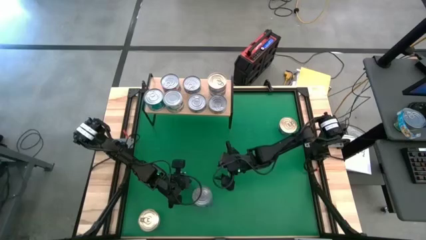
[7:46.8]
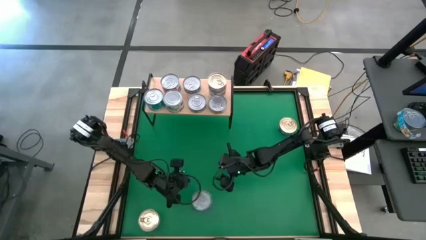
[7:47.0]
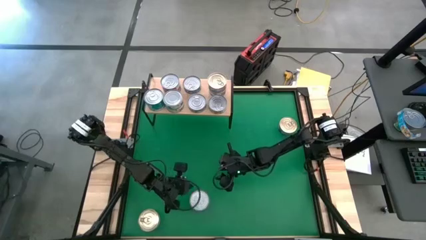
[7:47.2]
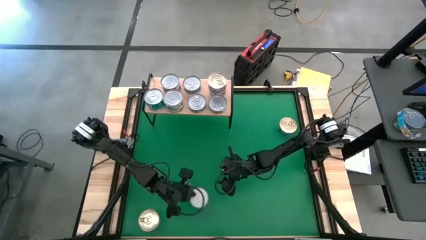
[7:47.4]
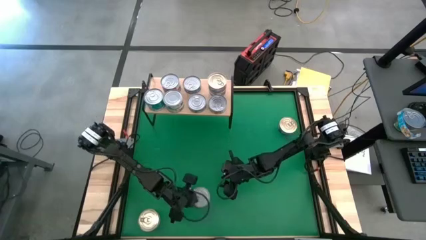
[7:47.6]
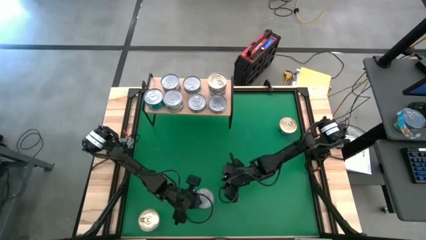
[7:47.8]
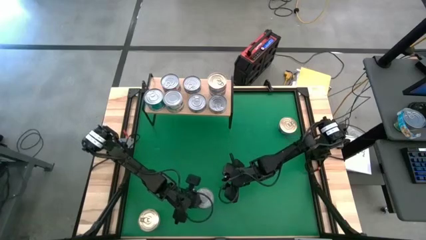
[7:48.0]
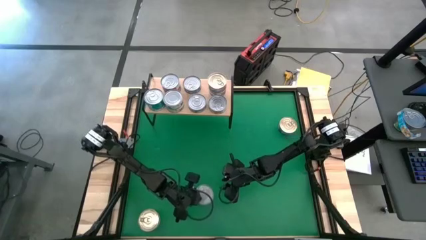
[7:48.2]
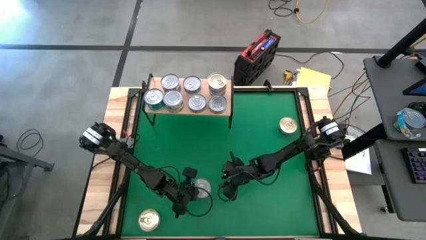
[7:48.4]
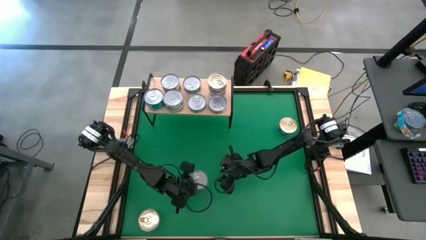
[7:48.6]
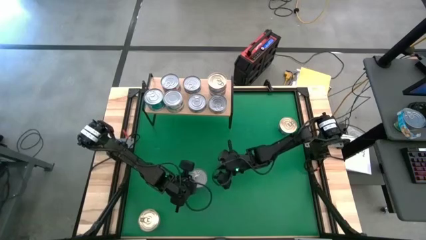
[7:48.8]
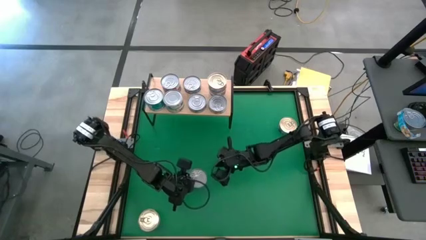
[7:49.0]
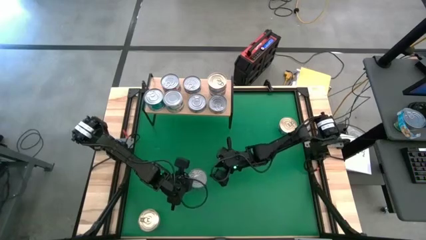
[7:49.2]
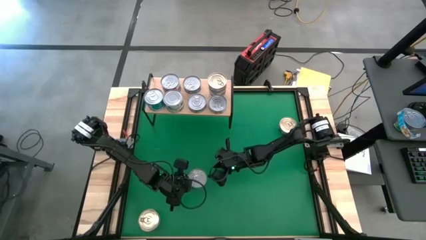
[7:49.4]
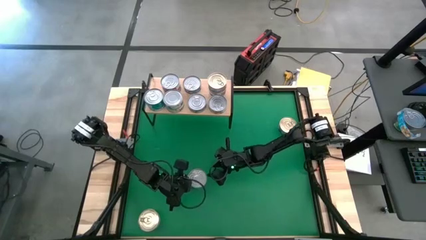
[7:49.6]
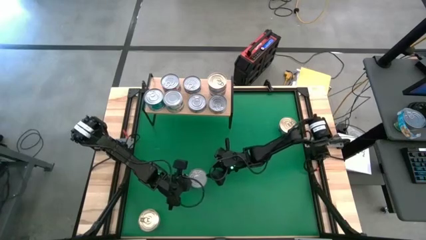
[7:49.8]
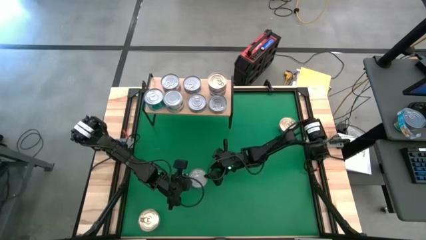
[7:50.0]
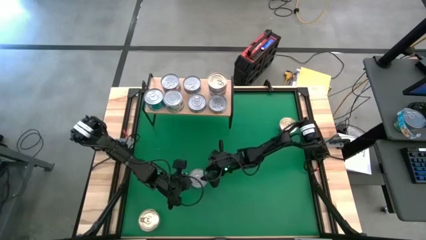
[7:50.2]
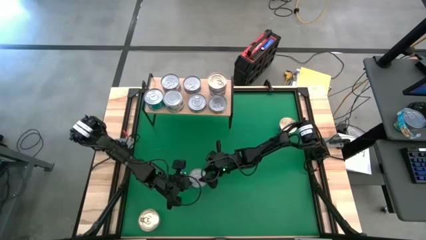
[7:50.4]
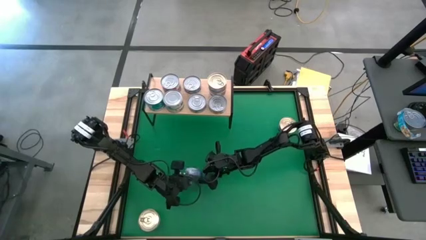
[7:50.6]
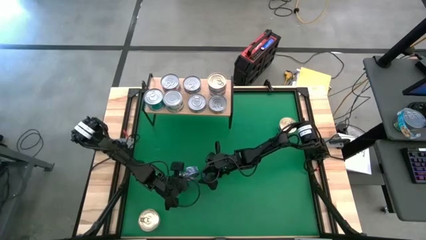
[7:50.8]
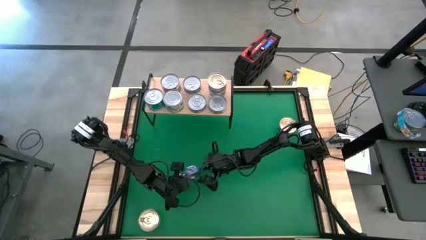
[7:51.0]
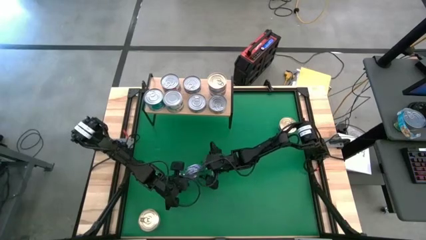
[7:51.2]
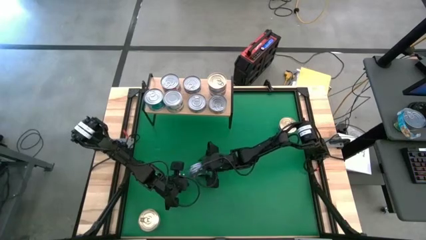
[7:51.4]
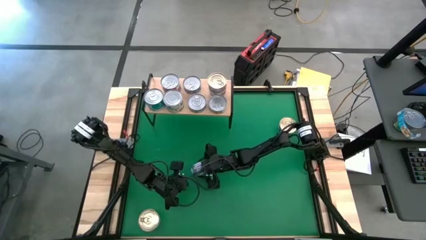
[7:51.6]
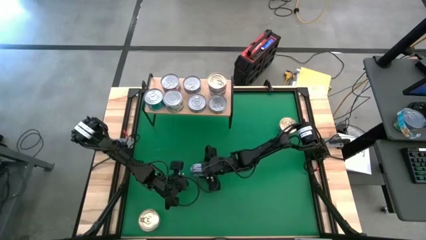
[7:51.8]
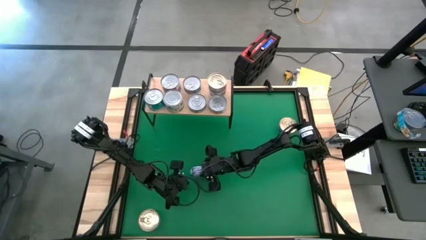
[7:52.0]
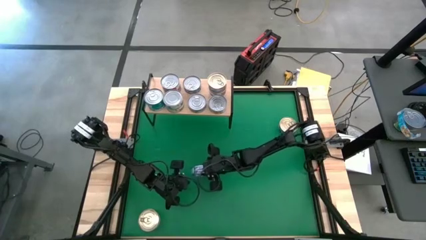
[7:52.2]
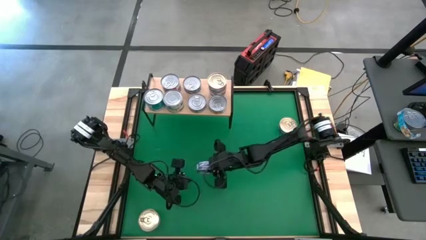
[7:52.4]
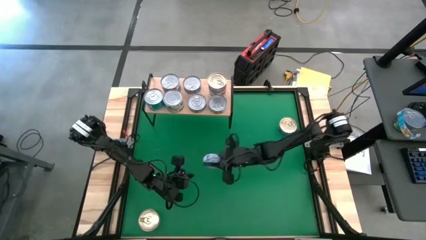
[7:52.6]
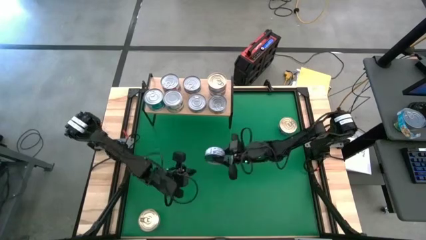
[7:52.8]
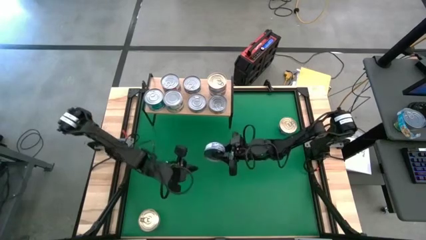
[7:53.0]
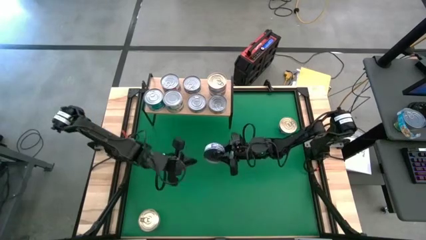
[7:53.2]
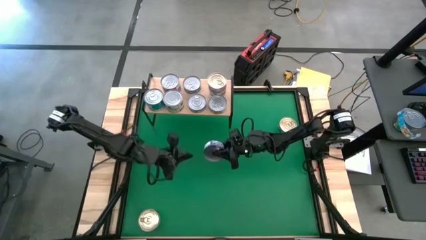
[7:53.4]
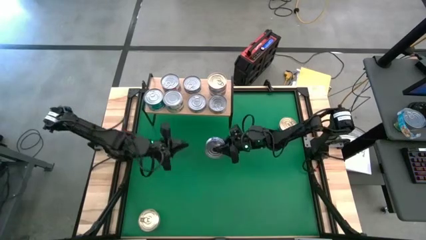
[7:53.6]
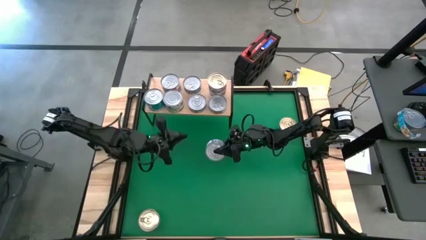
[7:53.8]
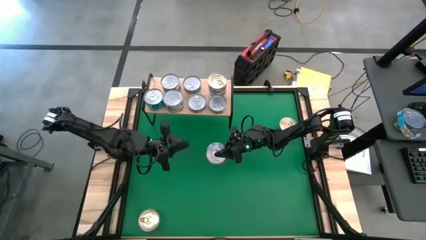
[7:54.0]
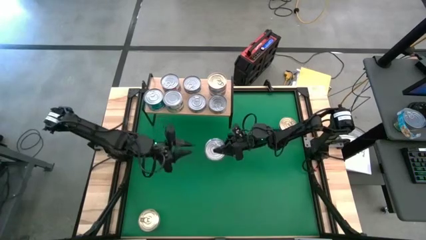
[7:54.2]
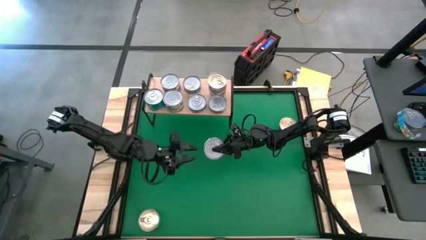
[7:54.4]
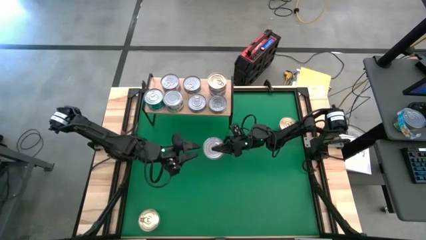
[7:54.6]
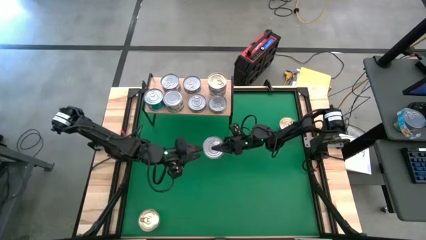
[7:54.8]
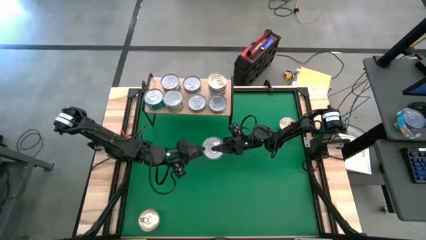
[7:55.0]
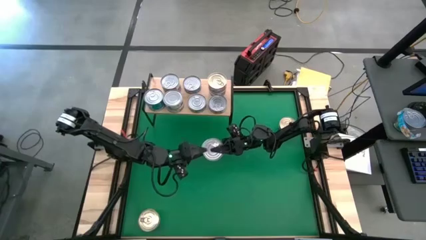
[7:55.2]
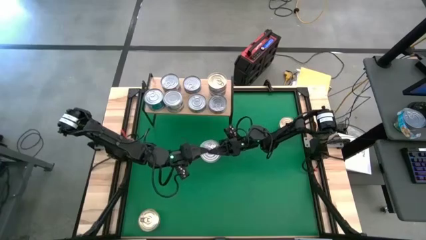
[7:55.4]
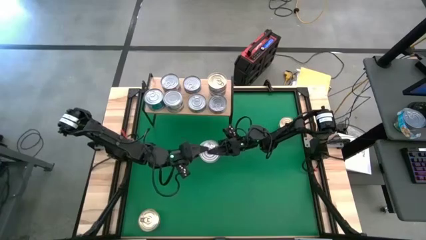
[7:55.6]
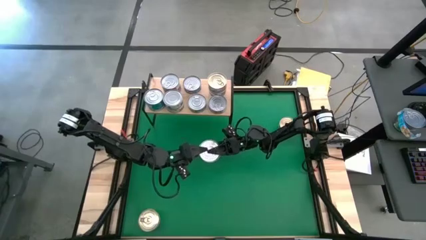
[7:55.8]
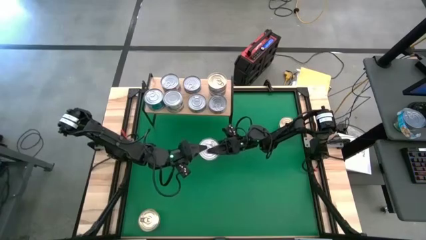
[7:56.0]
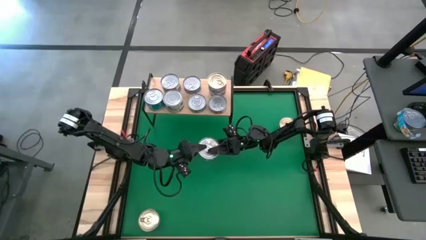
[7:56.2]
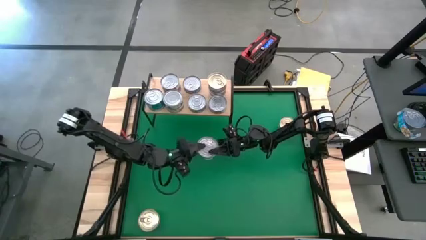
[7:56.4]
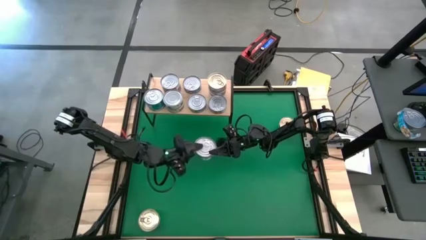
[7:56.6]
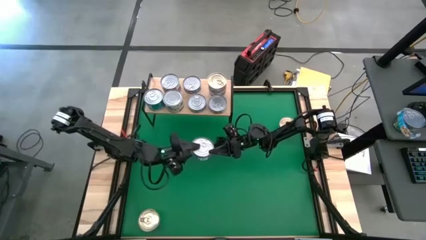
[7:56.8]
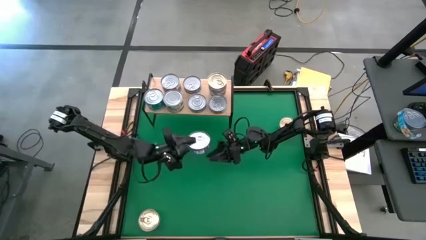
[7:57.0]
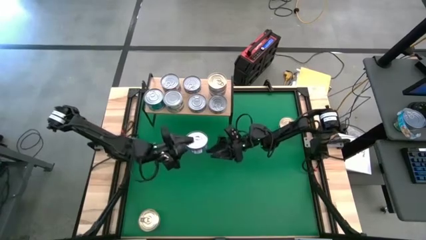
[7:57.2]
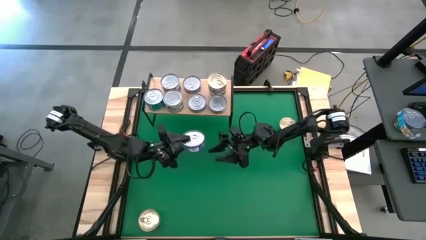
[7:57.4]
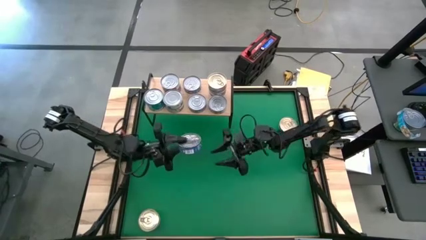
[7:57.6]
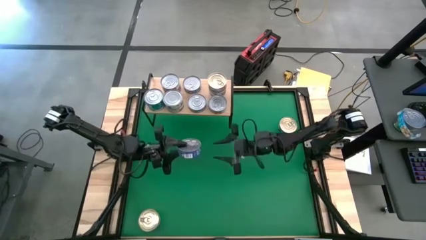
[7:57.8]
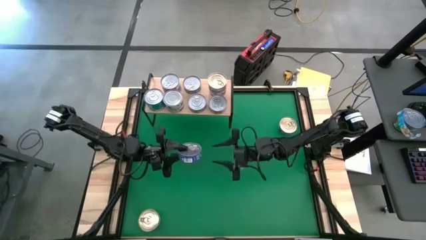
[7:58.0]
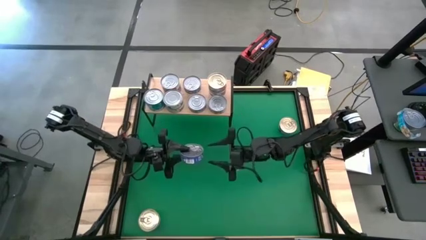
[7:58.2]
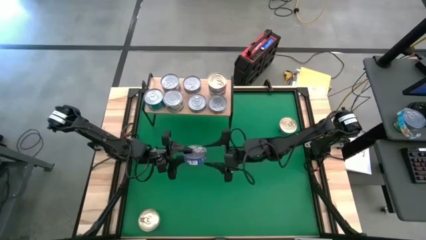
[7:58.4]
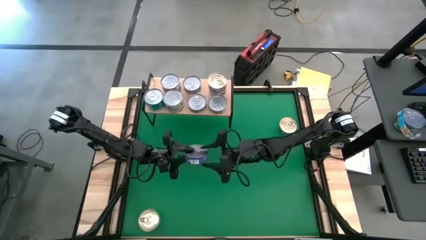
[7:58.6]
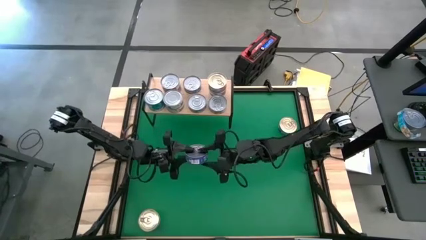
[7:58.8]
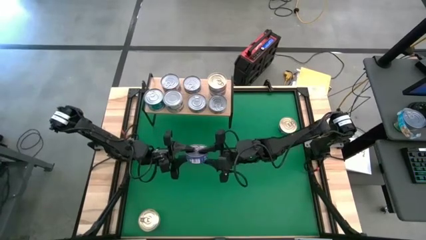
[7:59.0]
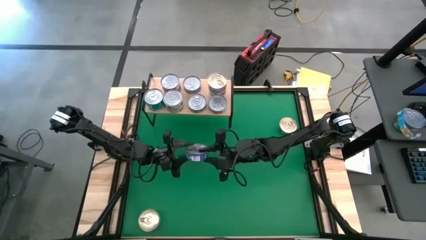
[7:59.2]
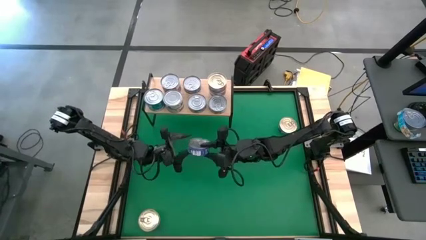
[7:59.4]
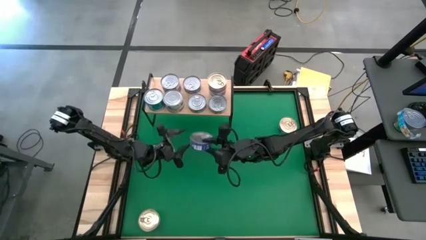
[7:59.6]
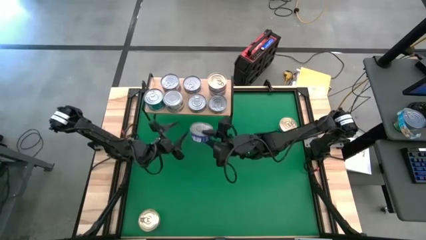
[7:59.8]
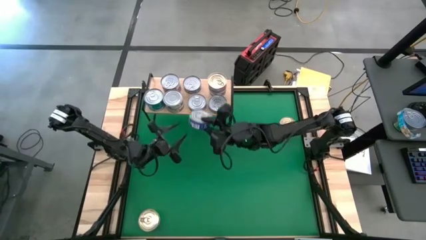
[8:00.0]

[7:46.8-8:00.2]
Task: Stack canned seafood by type on shelf
Stack the center dark blue tuna can on top of the dark blue tuna can on the shelf
